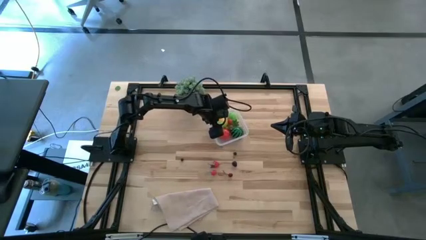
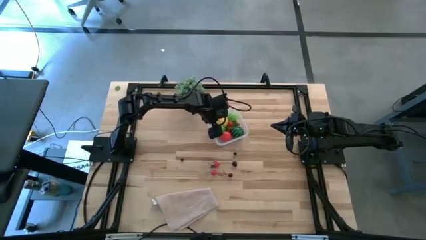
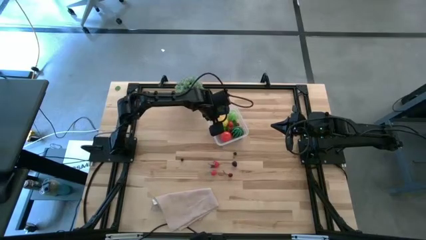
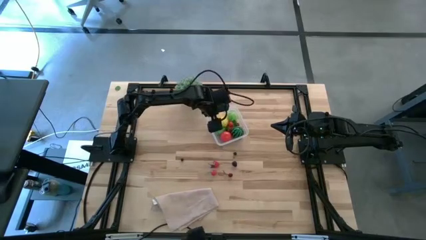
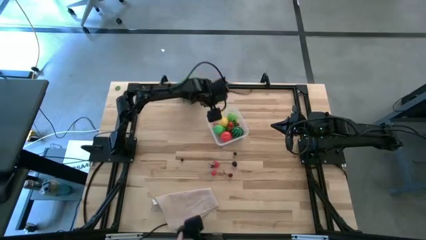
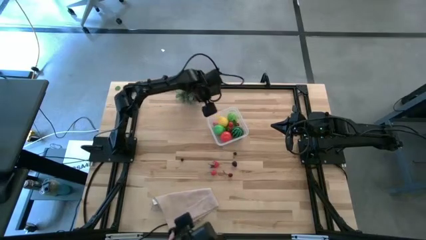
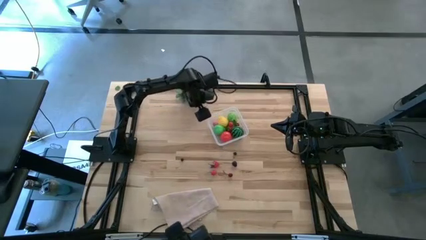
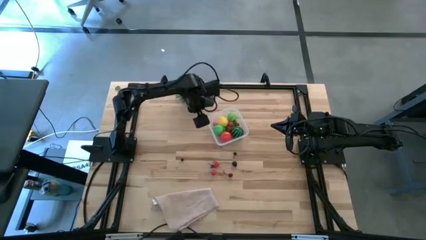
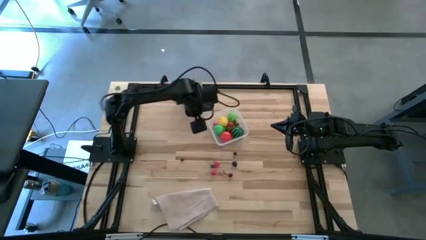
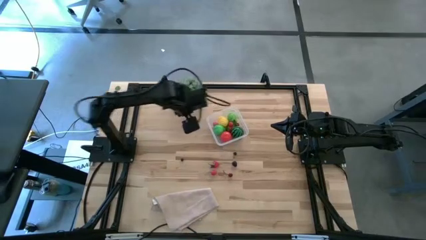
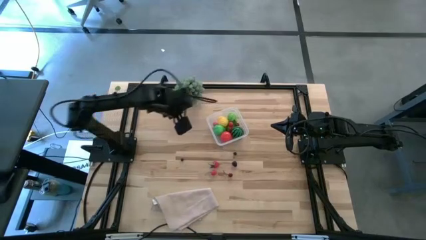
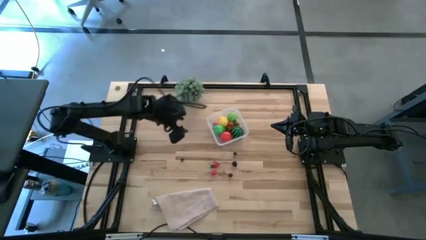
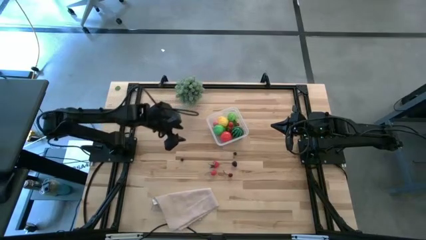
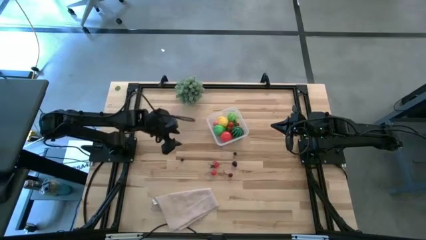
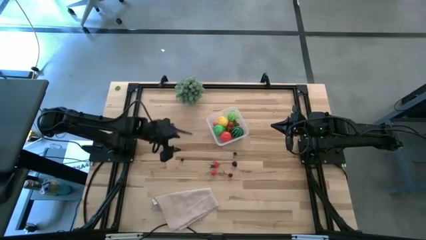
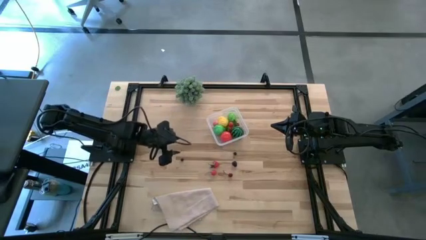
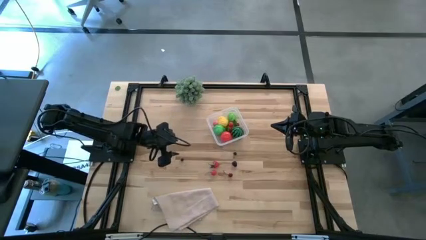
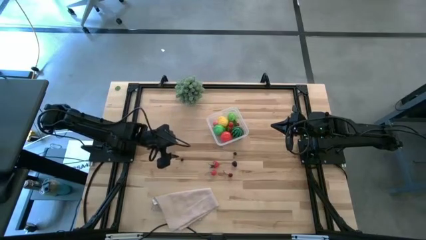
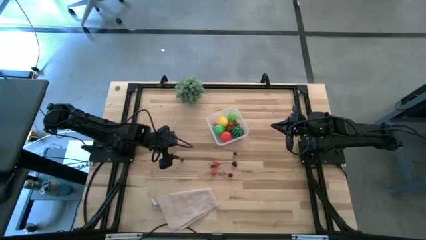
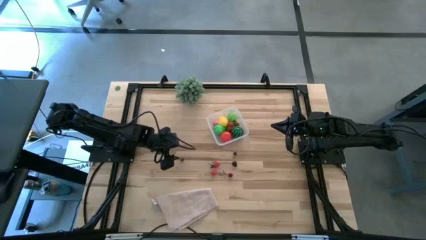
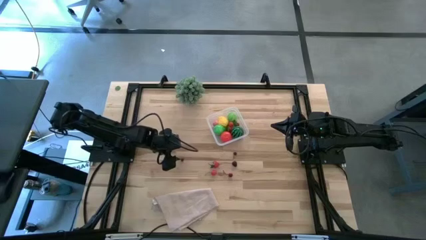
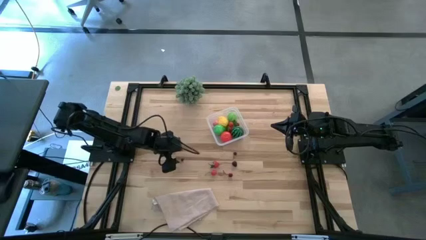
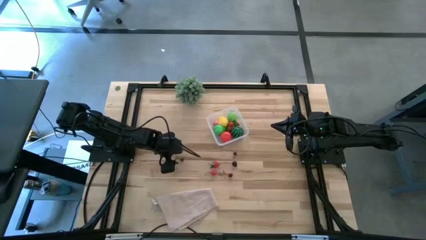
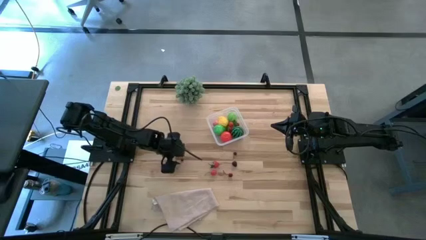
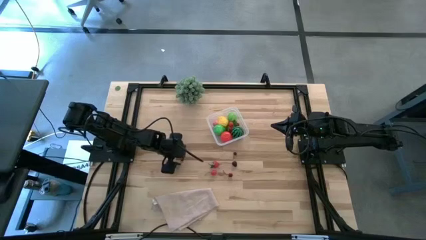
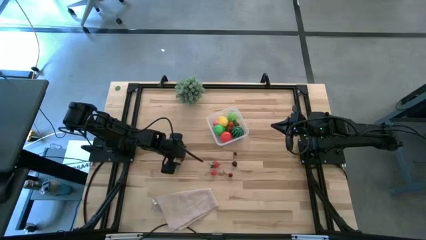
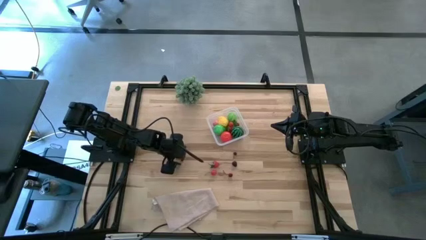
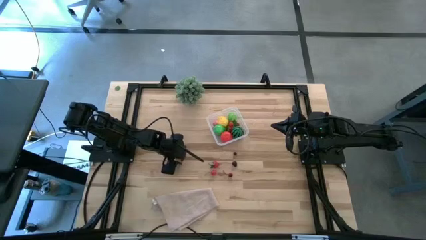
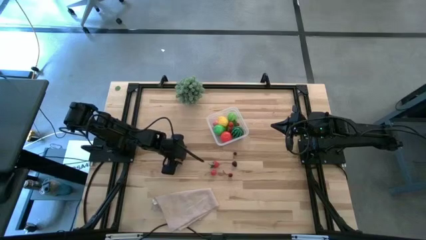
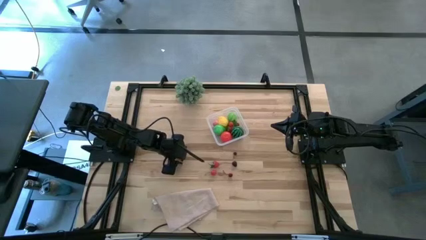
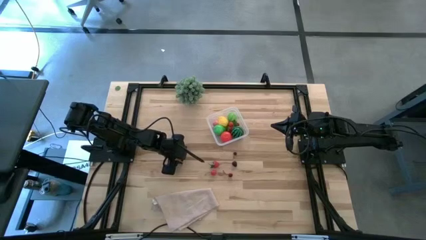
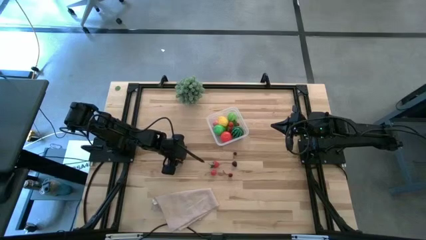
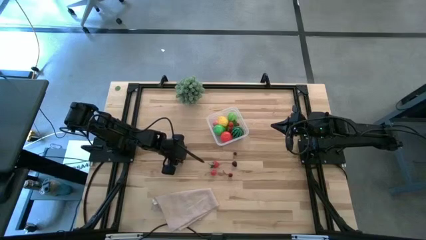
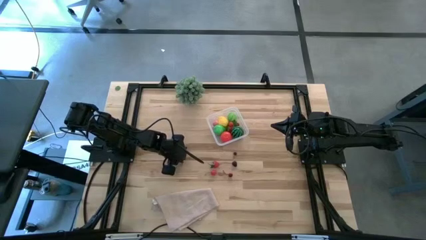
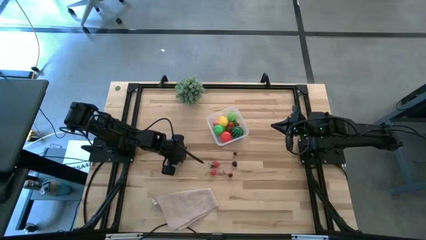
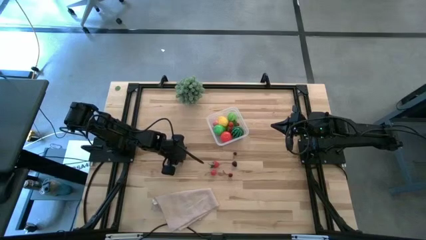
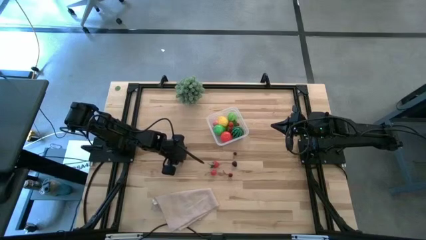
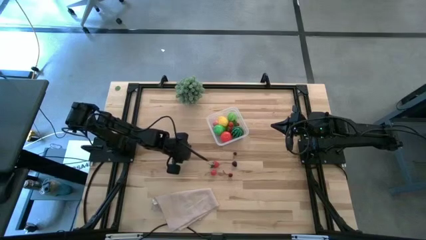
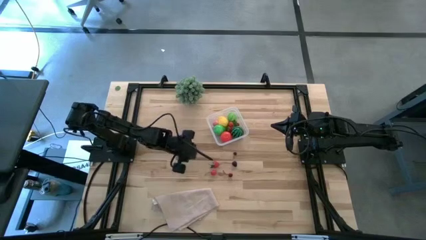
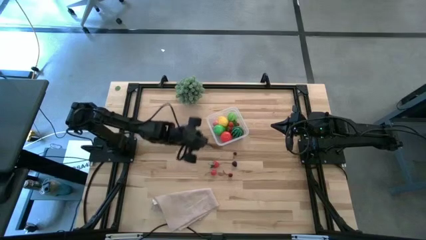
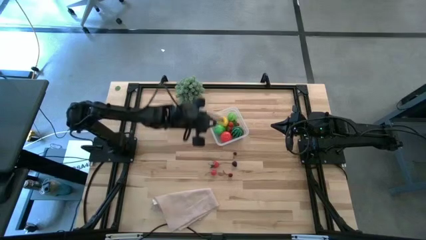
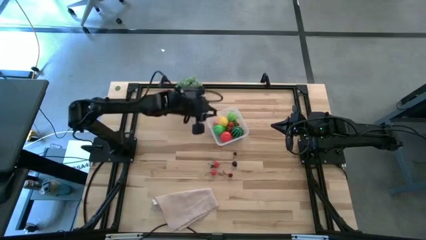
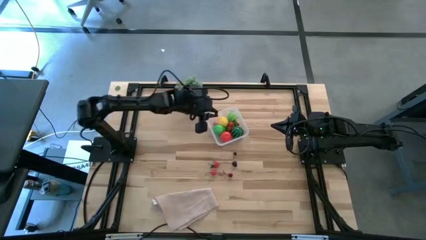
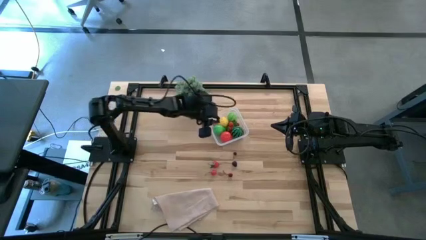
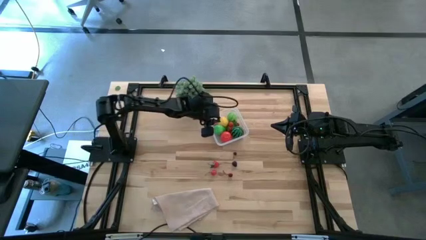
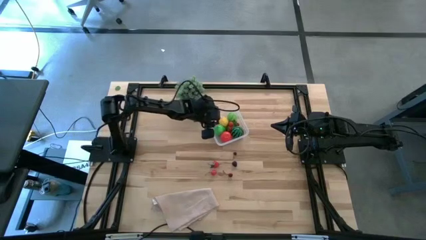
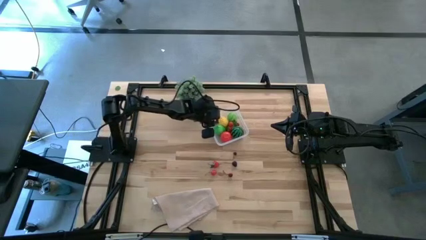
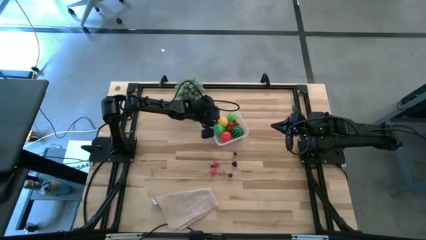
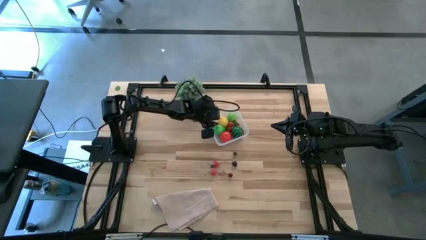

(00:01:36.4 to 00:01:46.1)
Task: Pick and placing Produce into tupperware
Put the blueberry into the transparent bin

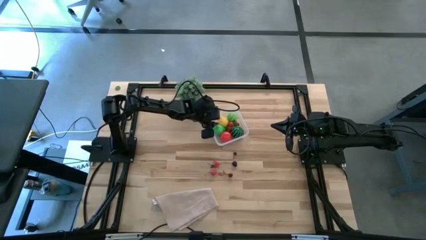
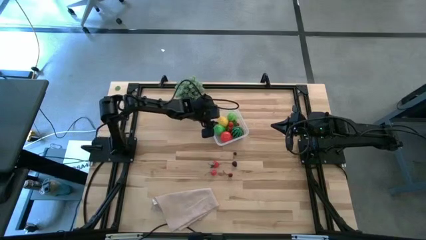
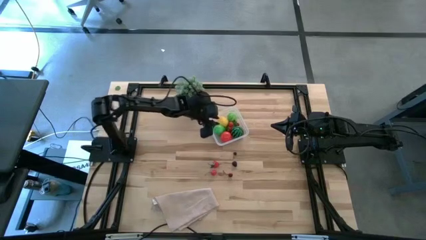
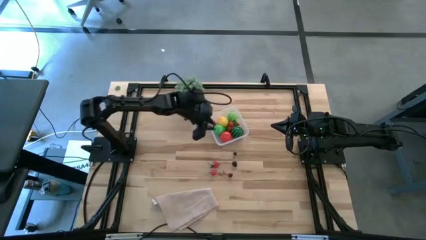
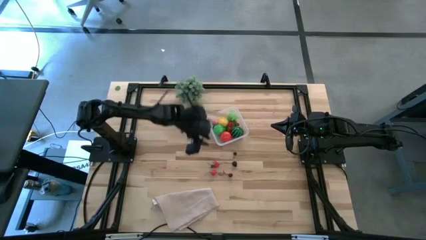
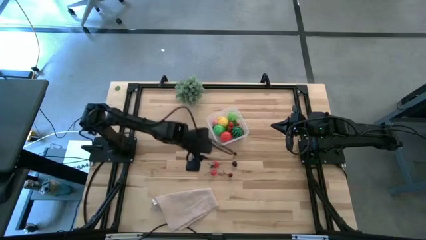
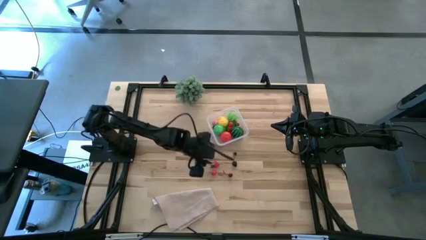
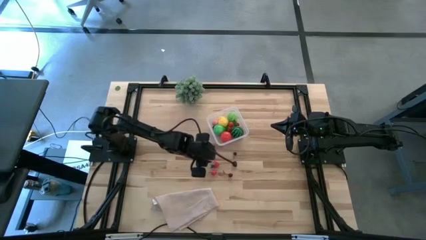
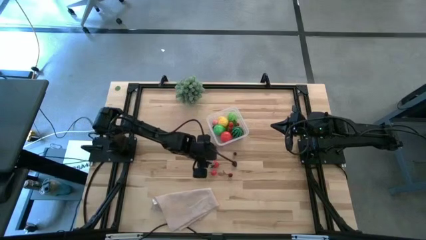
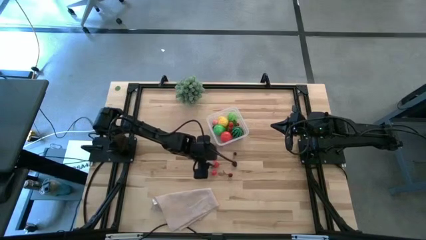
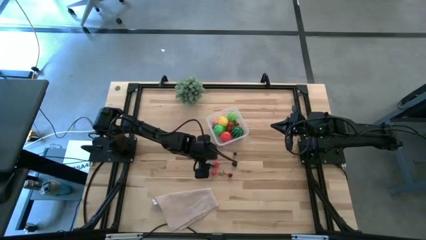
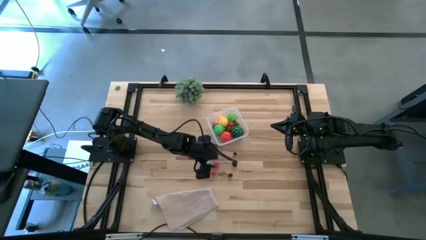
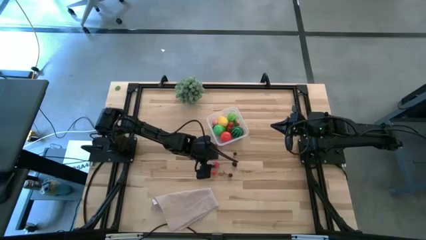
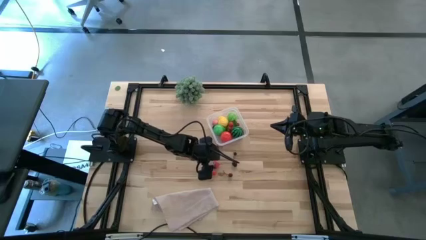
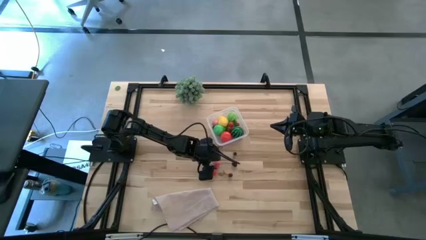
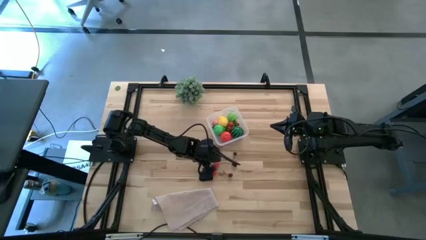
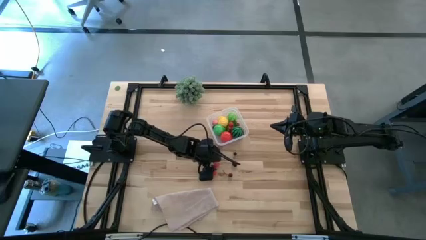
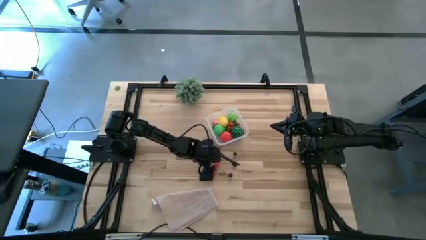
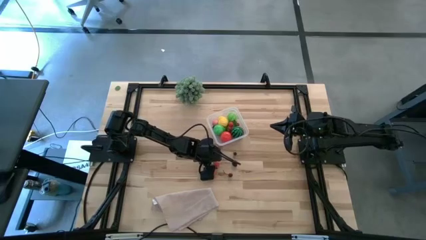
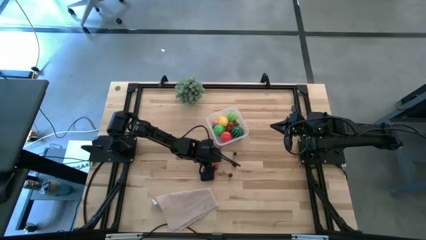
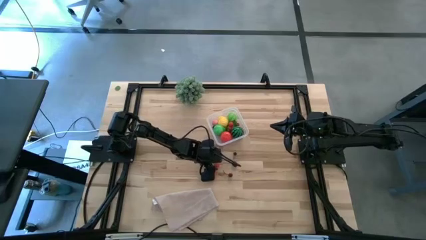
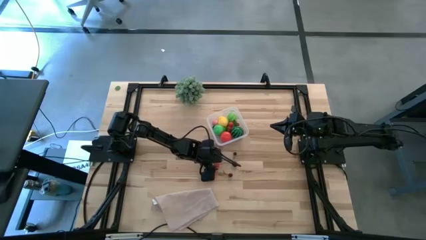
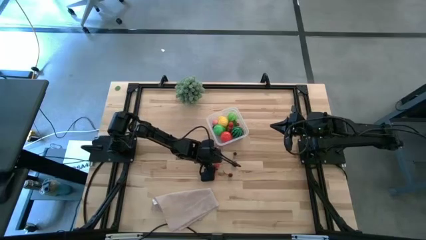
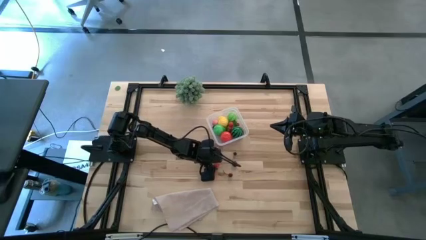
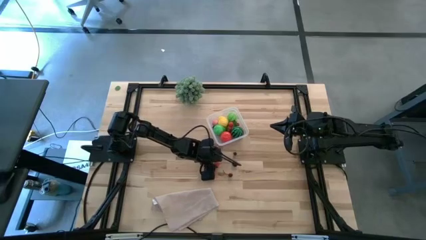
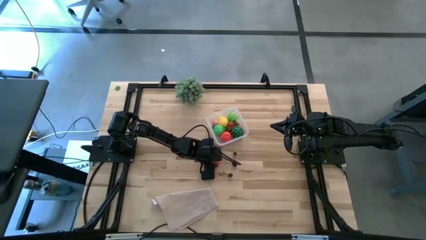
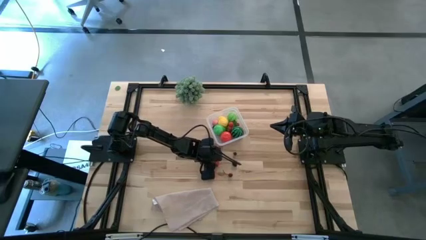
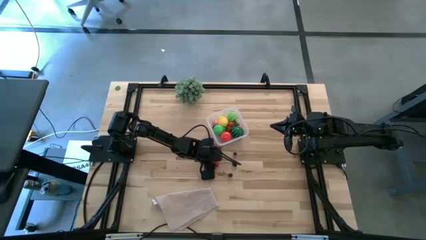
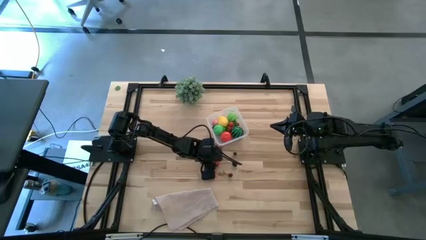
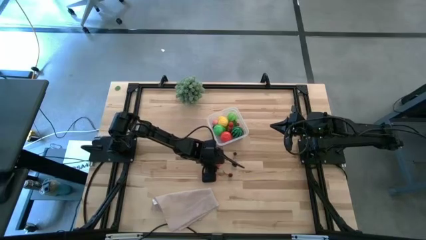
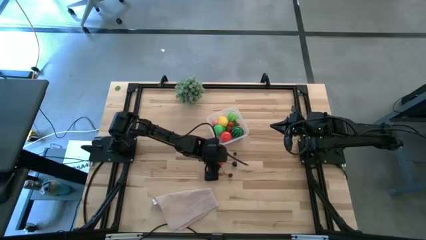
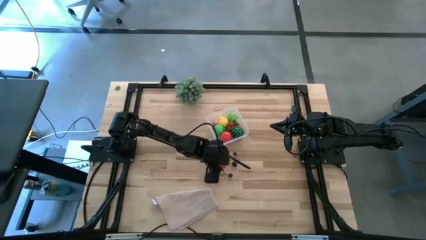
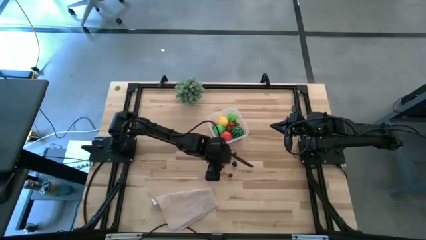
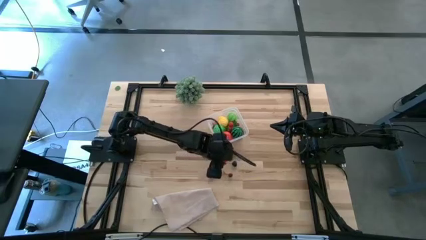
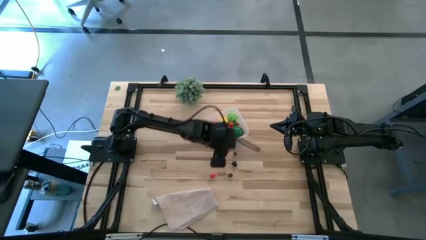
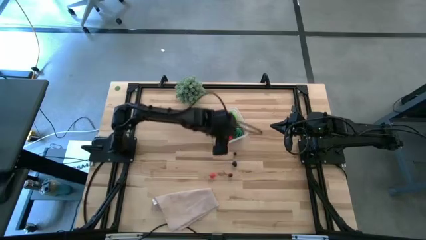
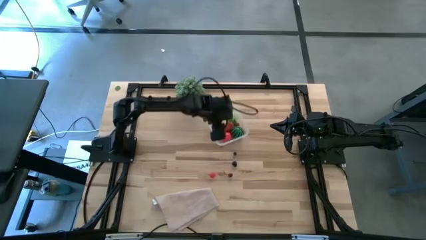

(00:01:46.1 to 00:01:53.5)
Put the red strawberry into the transparent bin
